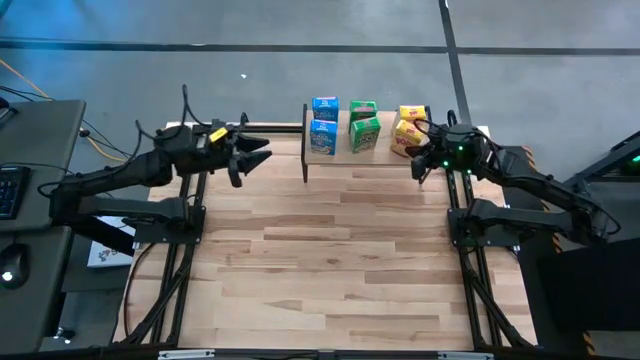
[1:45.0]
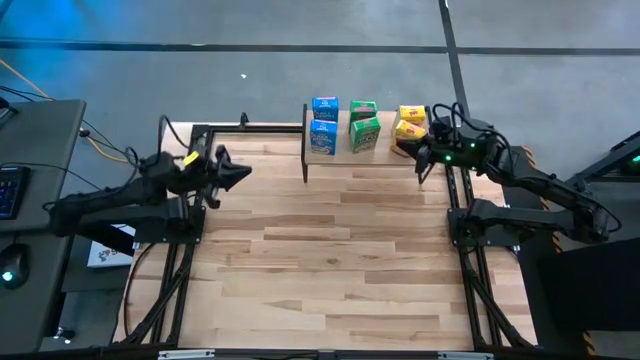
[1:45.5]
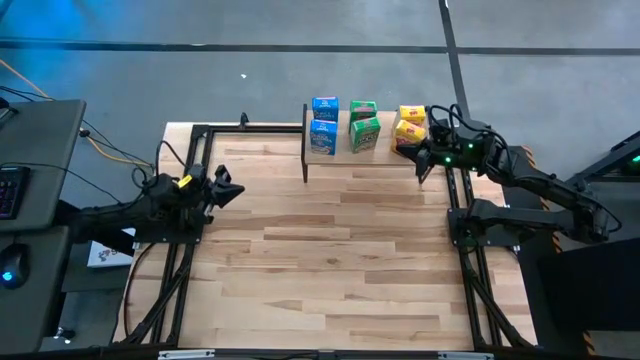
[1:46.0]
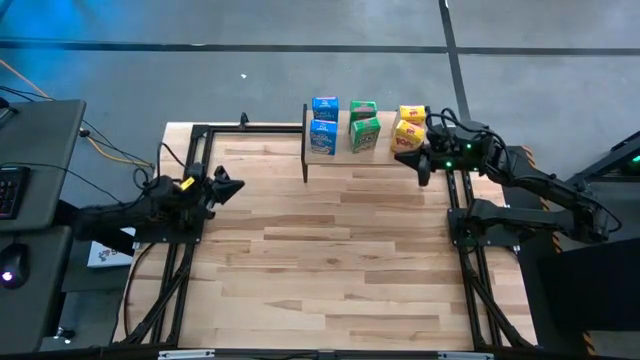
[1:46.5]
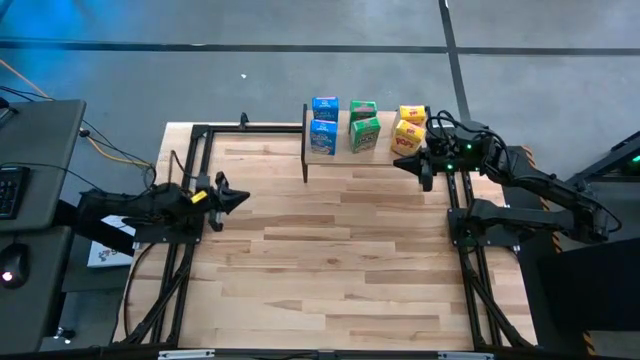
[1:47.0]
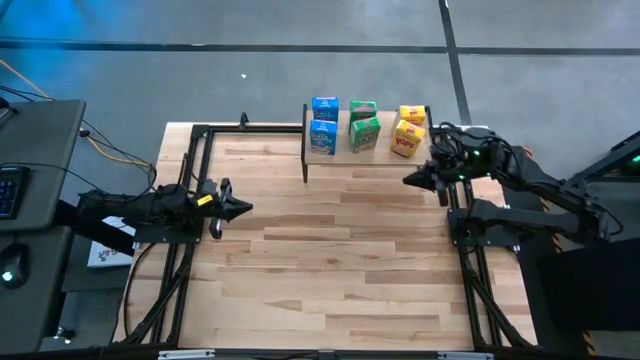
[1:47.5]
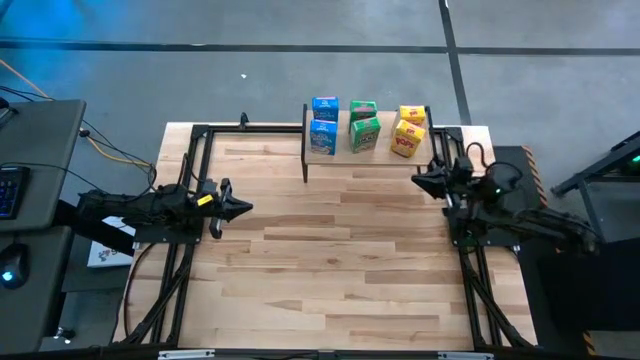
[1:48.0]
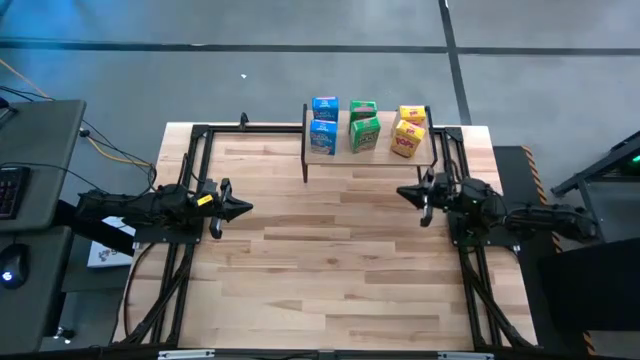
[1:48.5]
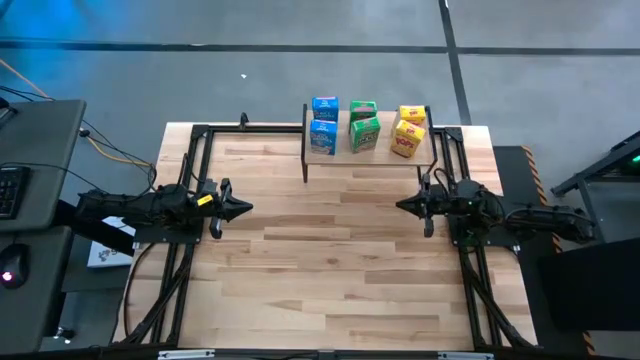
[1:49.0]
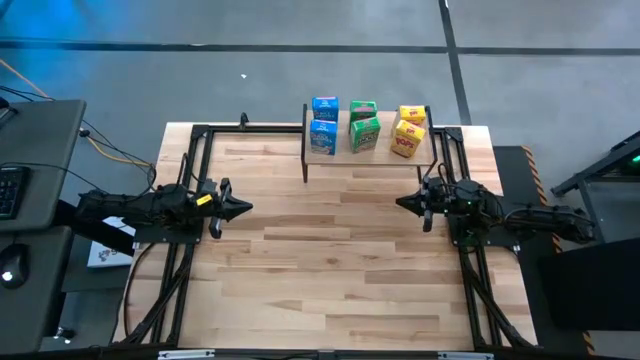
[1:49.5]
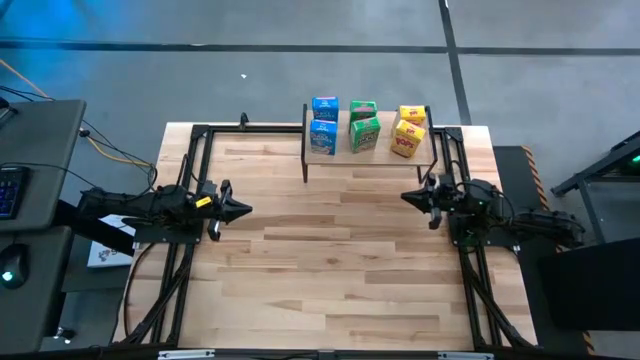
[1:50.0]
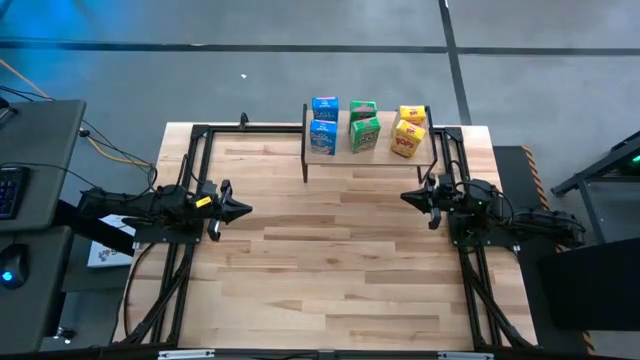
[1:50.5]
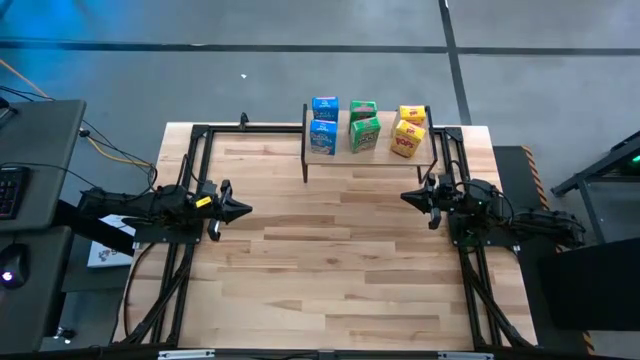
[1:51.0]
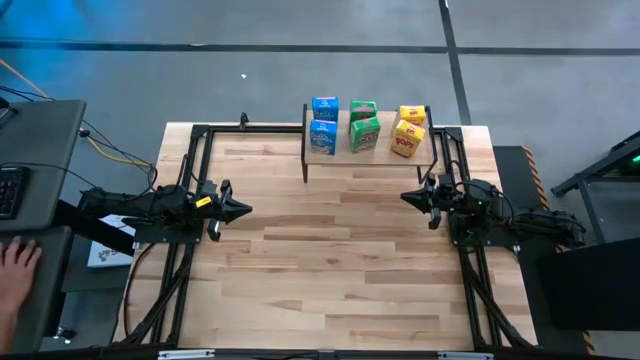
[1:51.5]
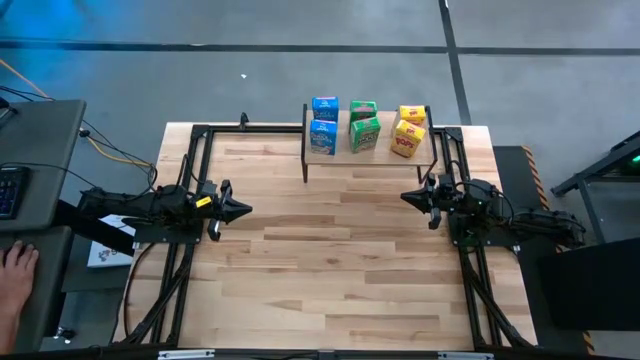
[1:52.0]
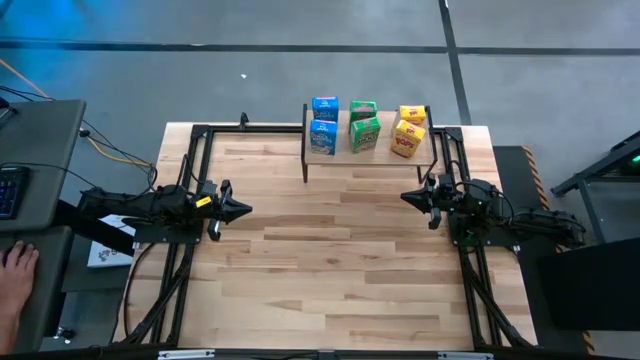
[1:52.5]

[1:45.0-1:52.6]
Task: Stack cereal on shelf
Return to Home Position

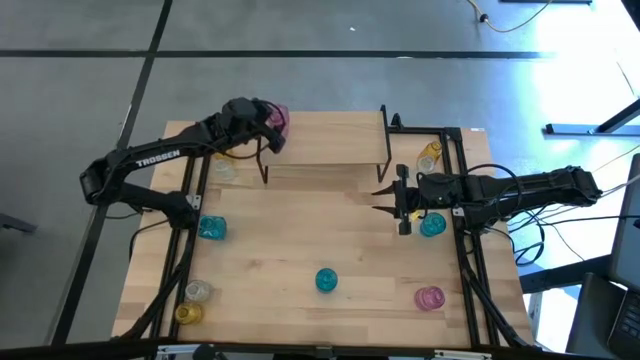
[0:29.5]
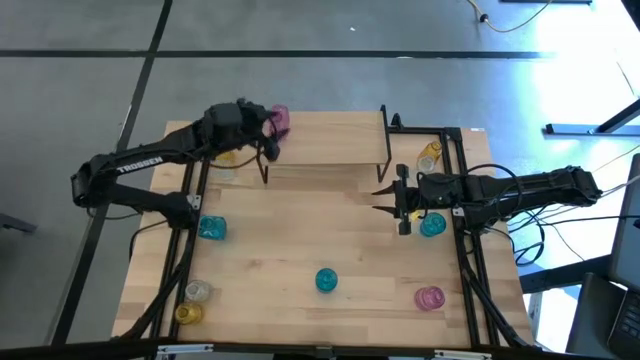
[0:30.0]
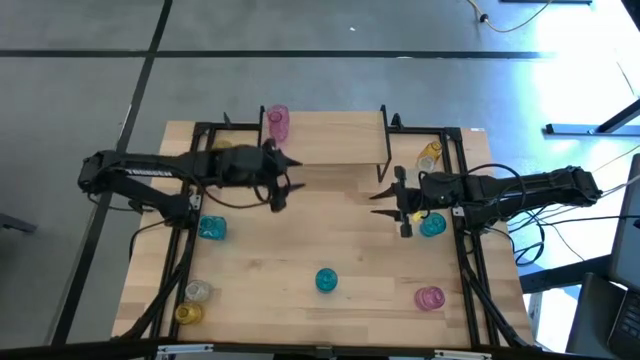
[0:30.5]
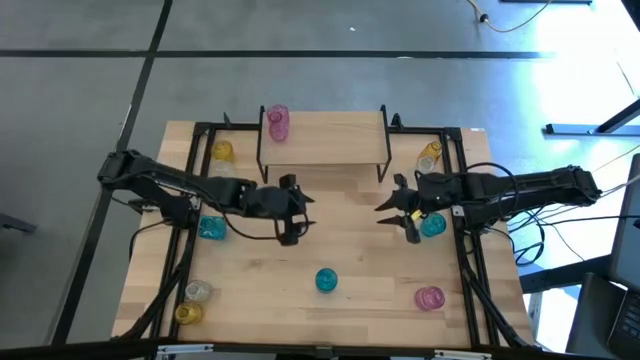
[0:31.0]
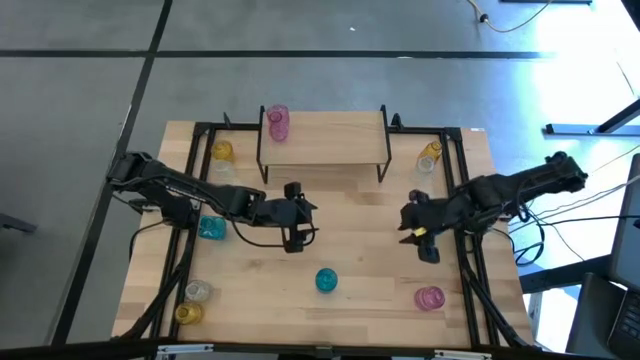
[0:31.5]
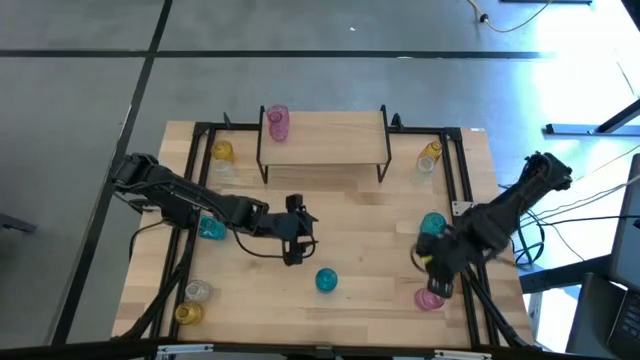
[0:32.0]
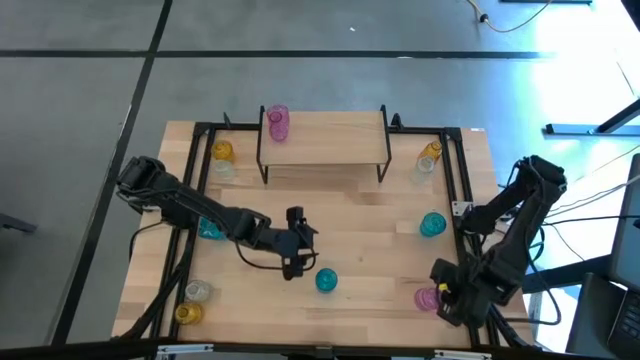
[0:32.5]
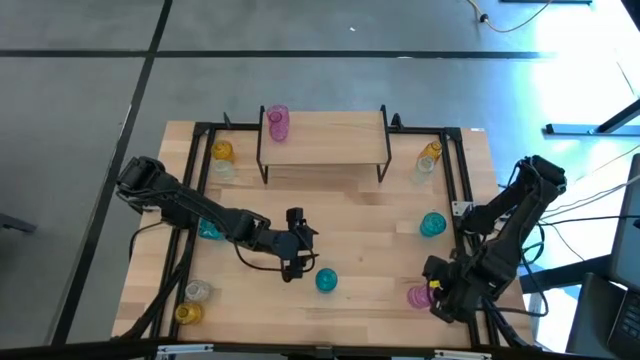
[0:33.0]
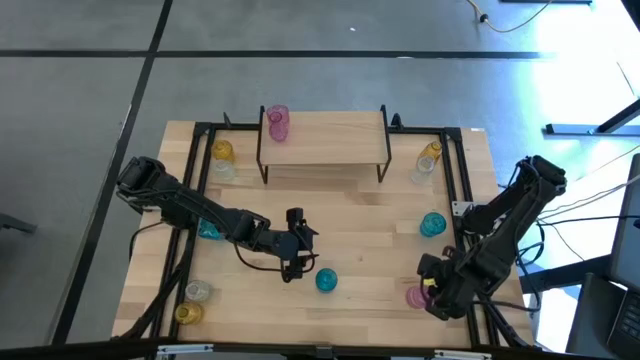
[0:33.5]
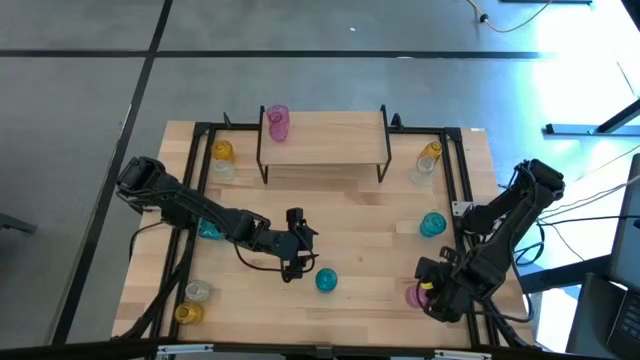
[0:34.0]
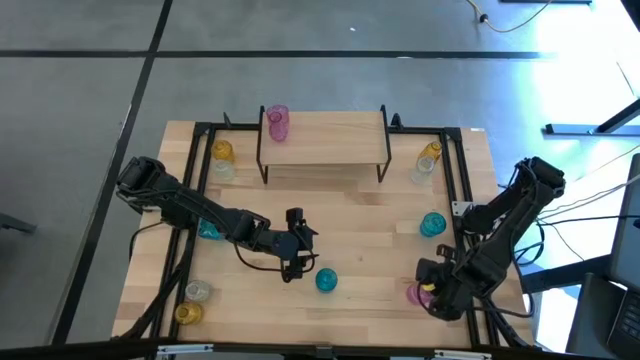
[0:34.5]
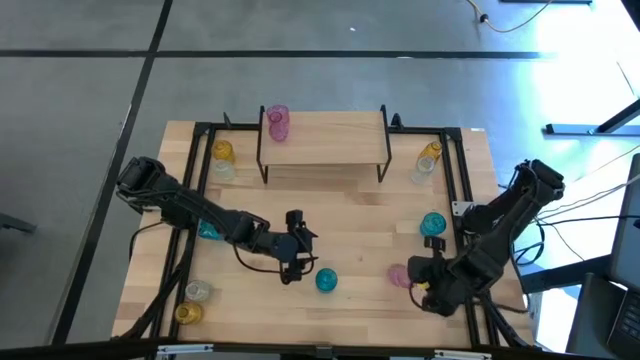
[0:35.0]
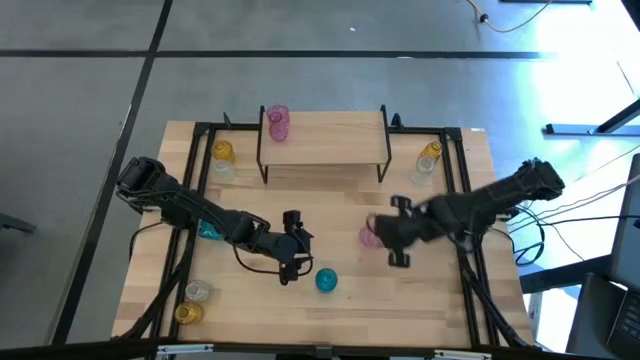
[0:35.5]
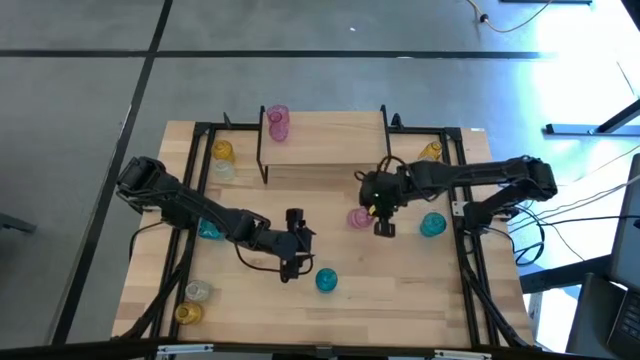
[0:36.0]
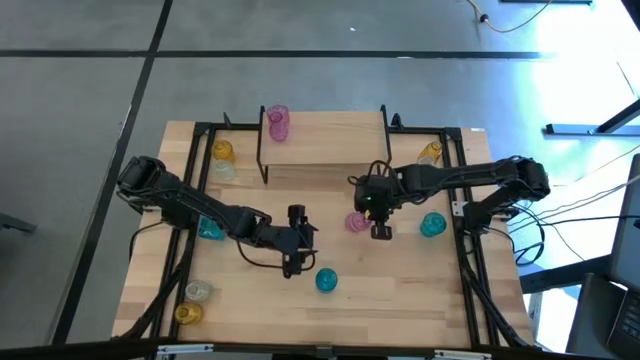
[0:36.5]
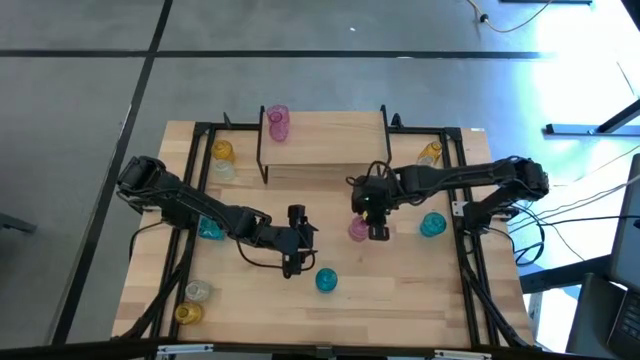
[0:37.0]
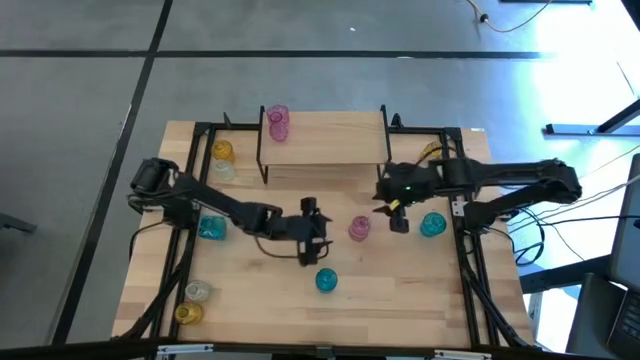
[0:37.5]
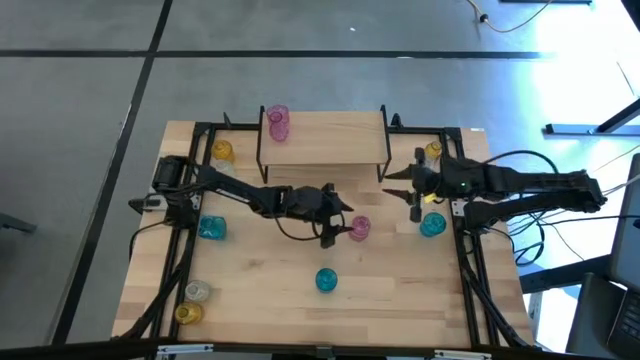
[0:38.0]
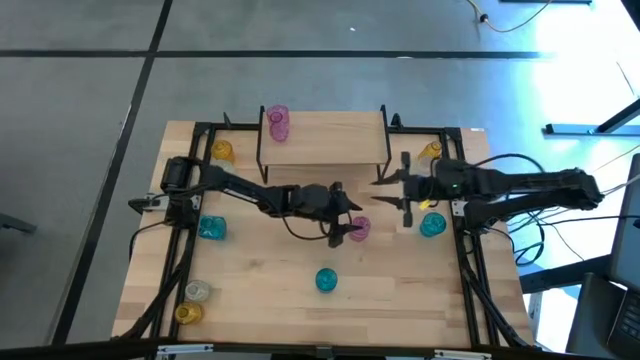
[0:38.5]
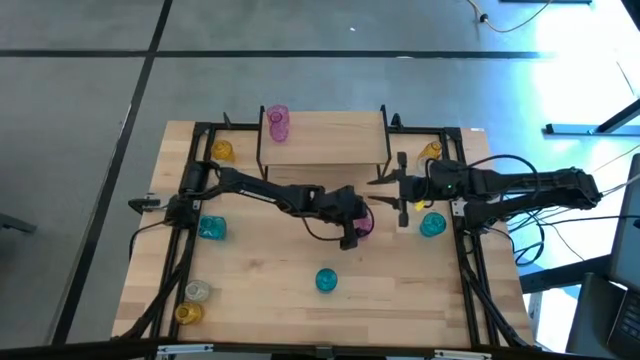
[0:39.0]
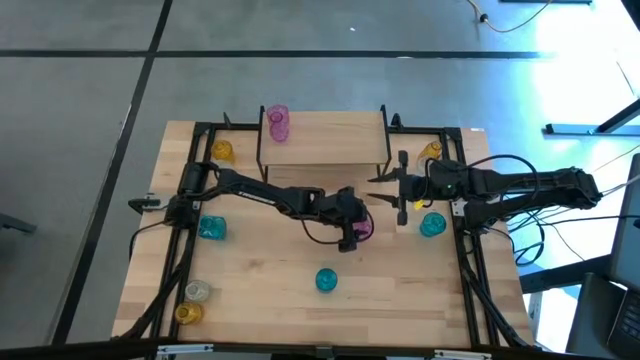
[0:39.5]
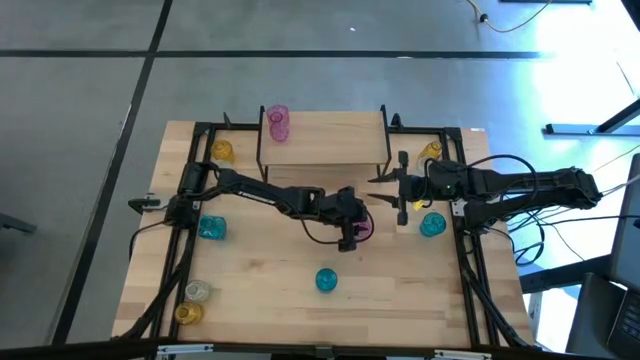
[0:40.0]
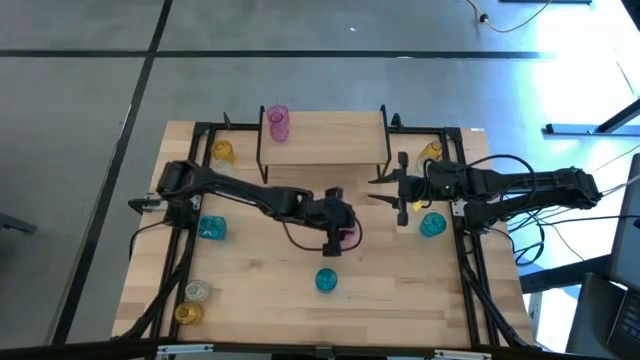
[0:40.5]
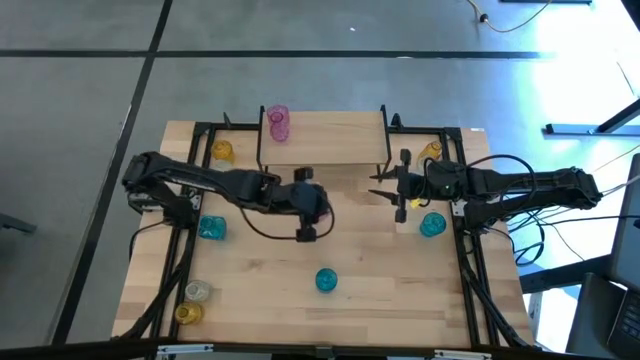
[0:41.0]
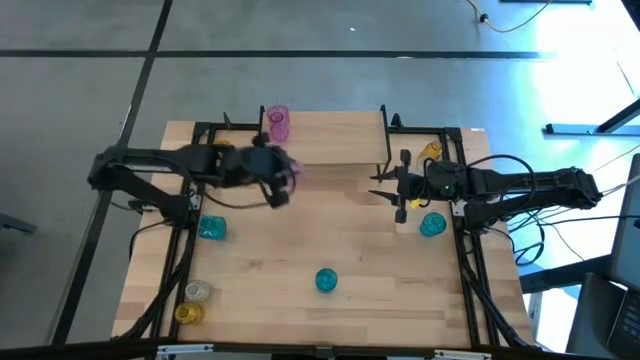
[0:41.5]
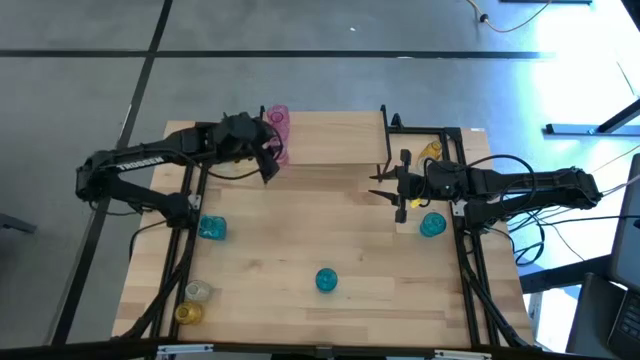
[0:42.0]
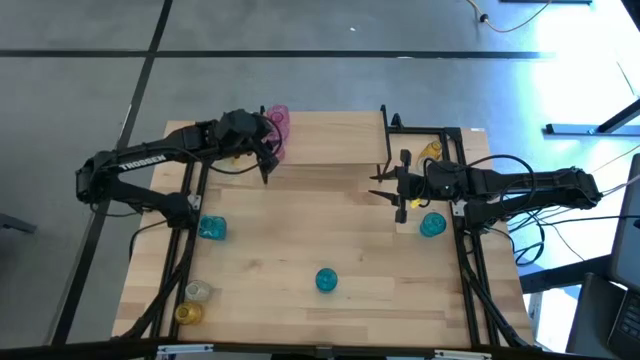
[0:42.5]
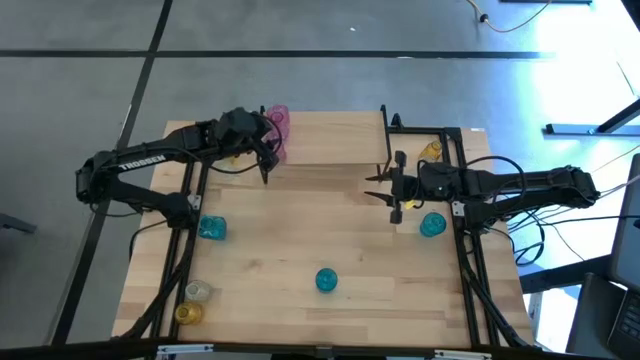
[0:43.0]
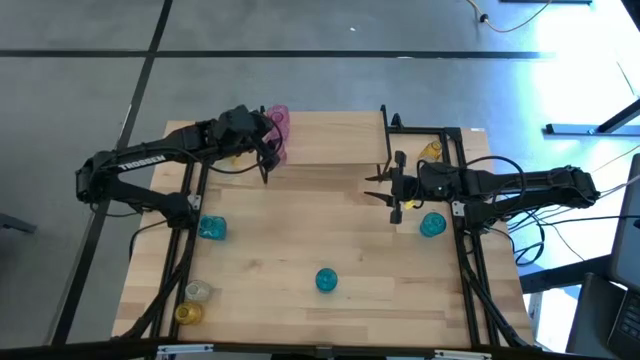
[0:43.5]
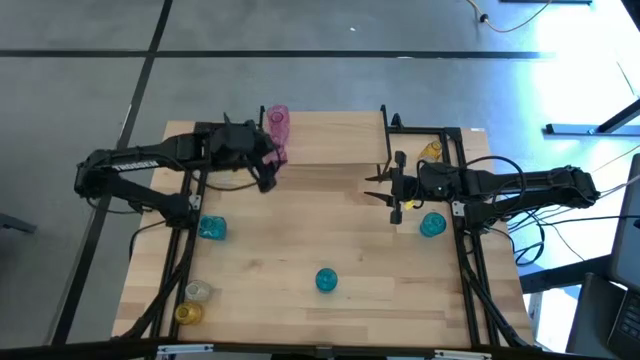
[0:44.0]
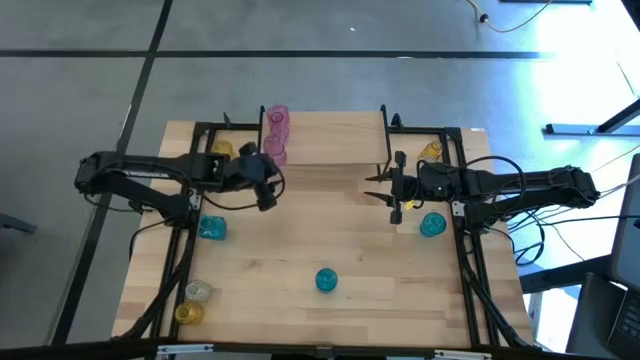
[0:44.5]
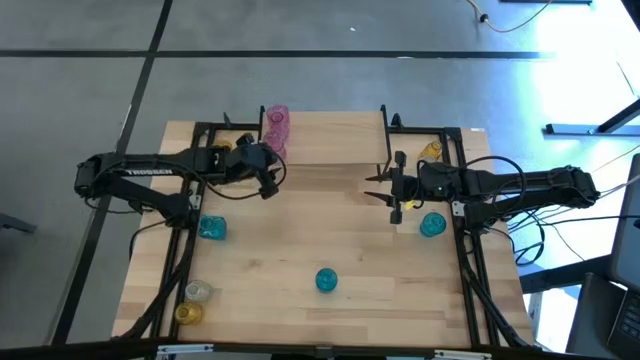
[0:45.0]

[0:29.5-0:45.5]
Task: sort vases onto shelf
Put the violet flower vase on the shelf aligned with the other violet flower vase
